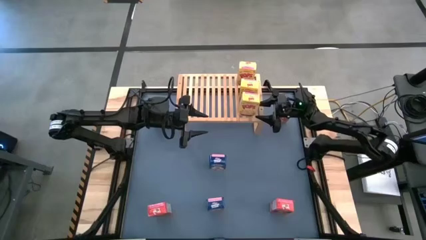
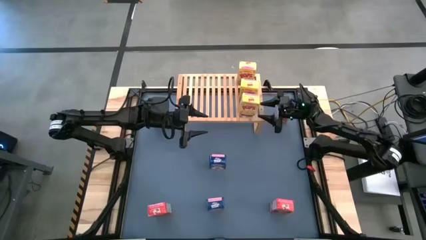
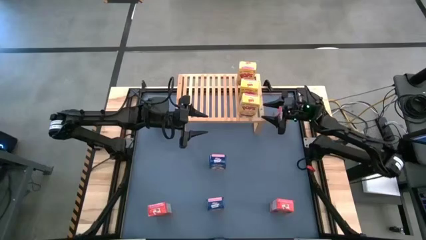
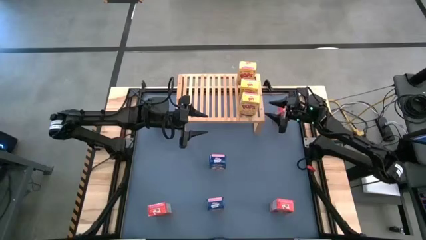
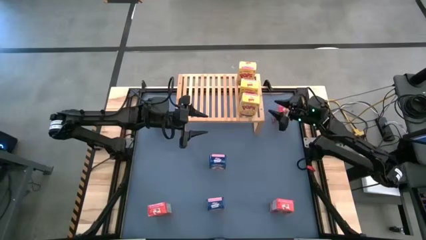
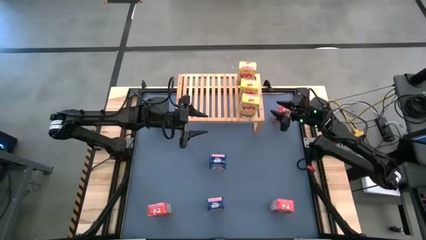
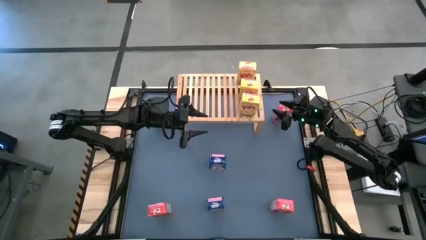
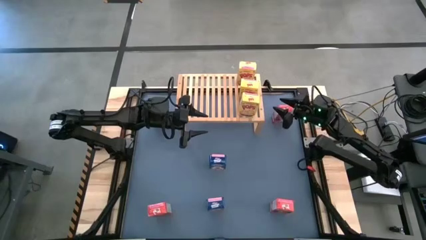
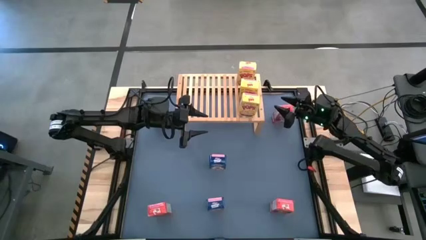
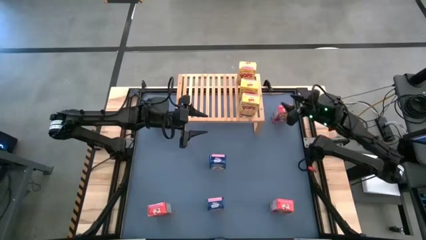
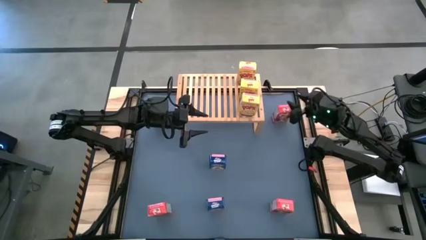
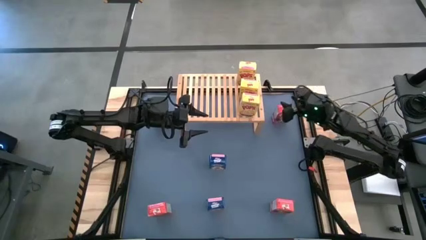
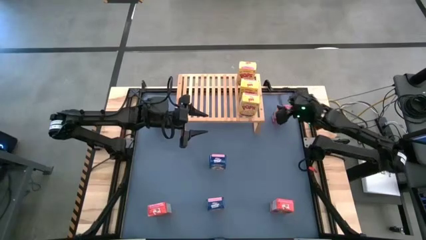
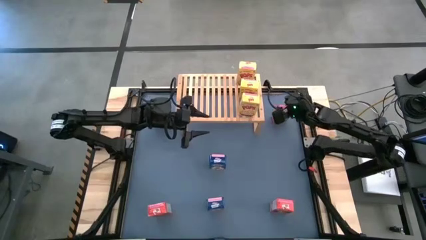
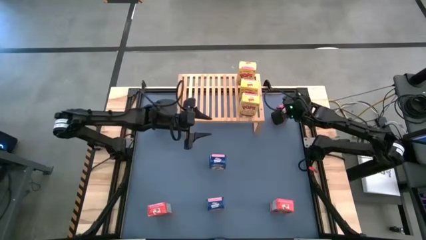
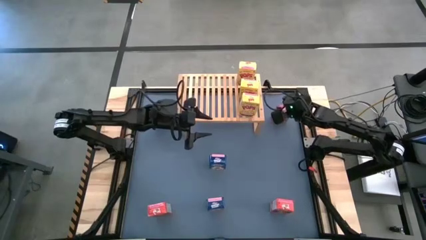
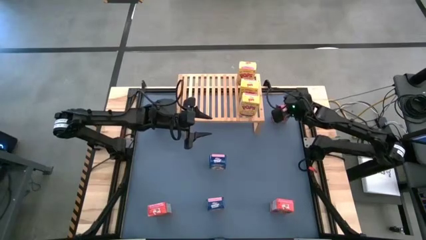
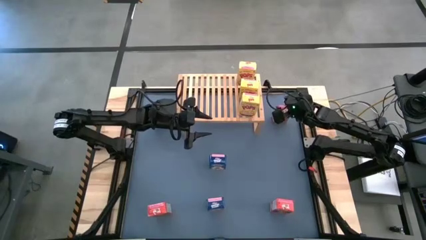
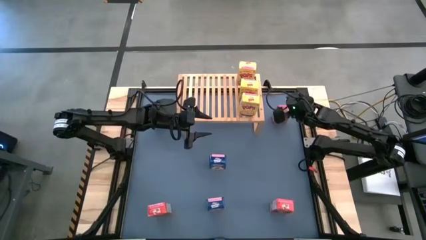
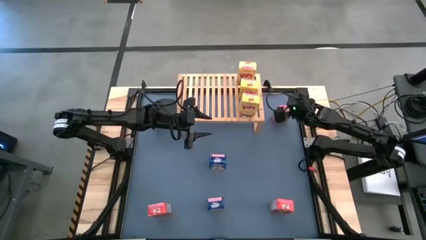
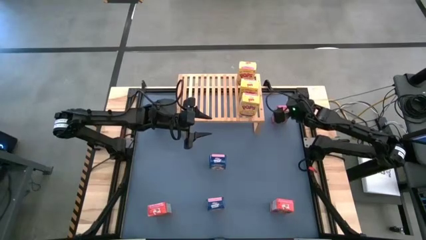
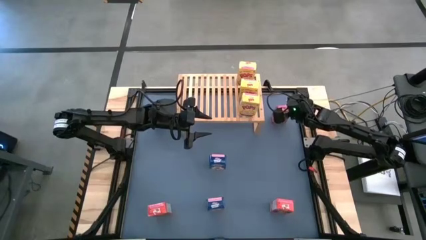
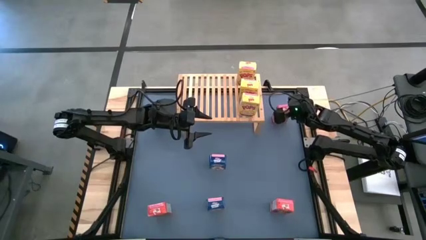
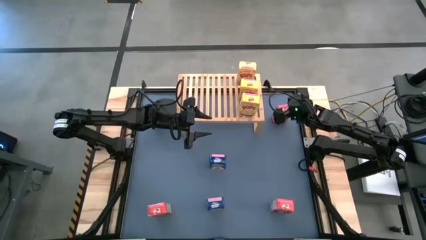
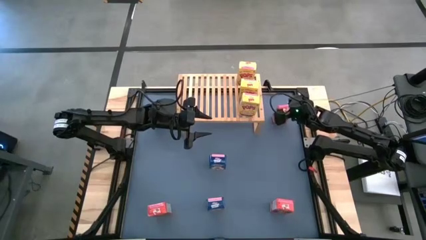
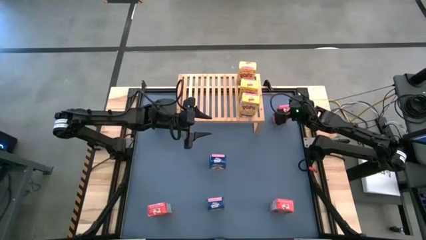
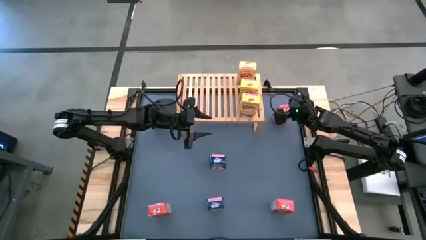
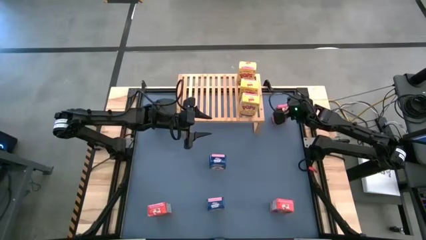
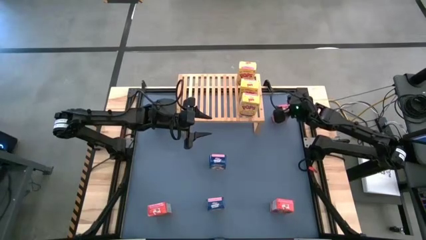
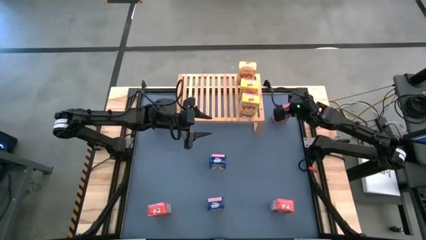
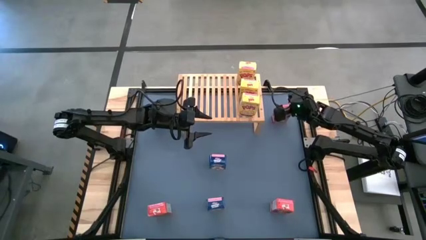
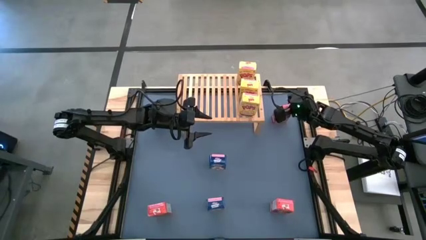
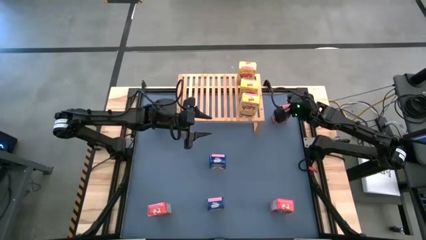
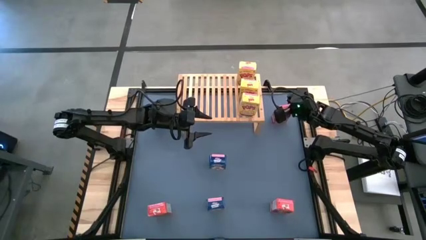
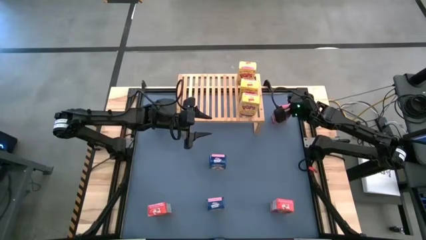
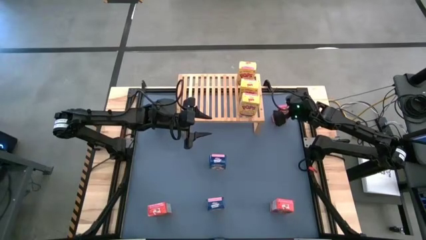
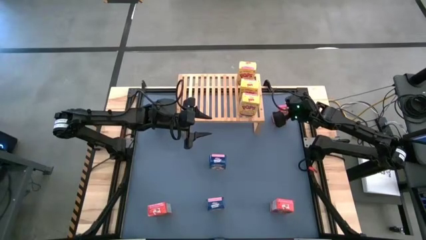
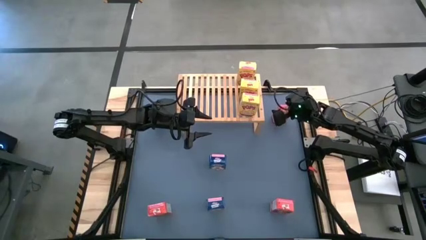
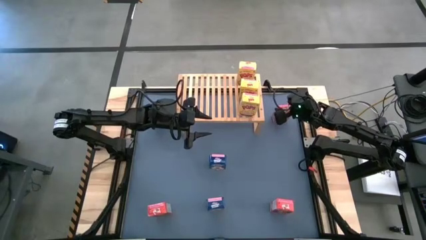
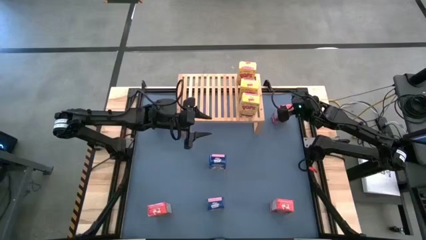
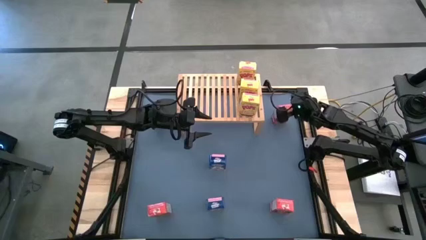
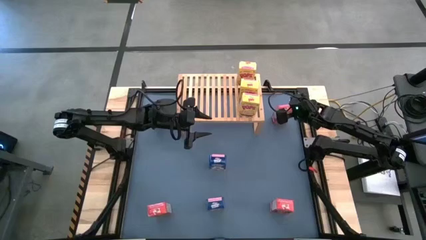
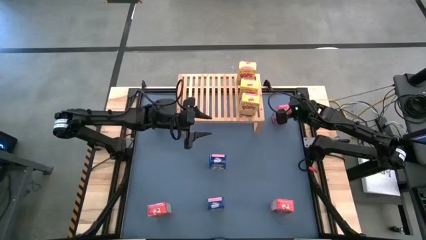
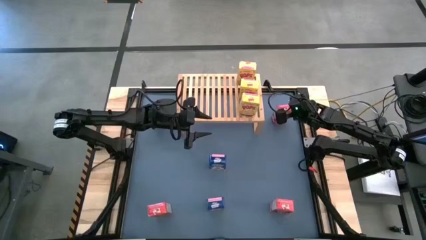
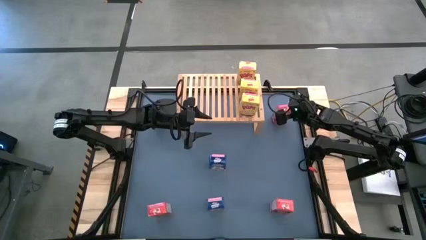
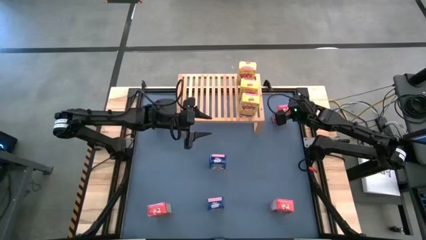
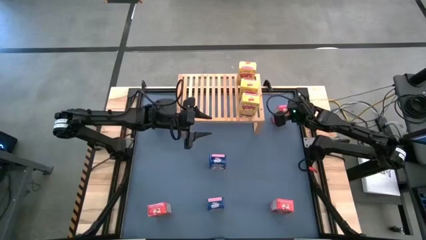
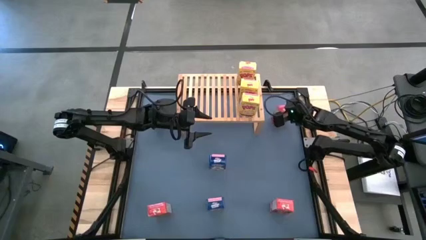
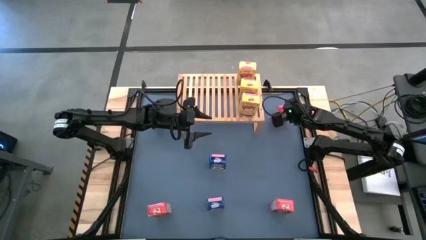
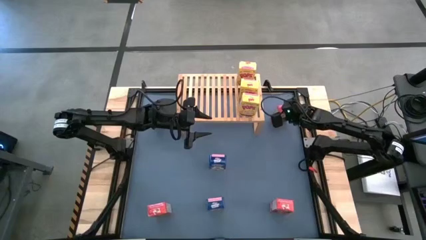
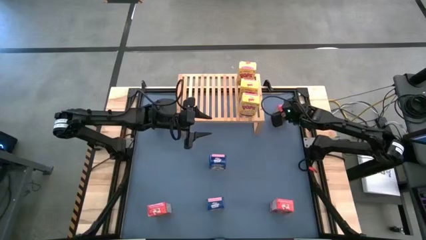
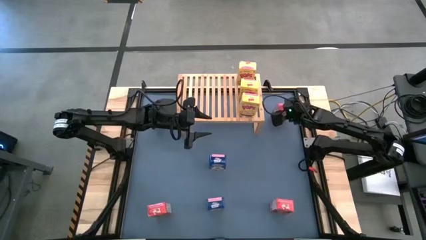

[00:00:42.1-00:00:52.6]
Task: Stack cereal on shelf
Put the top red cereal box on the shelf

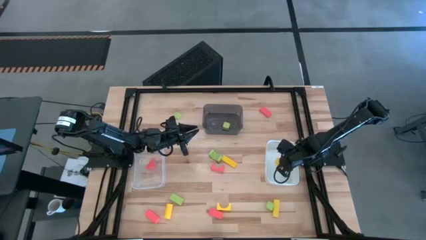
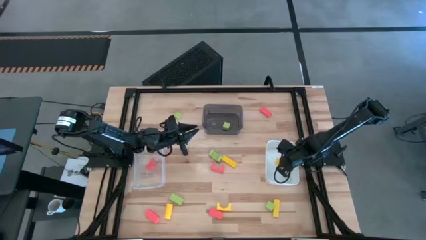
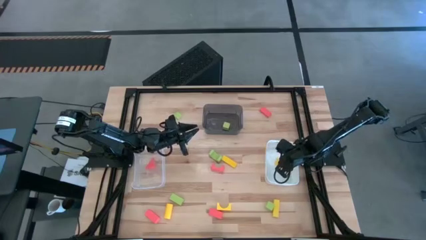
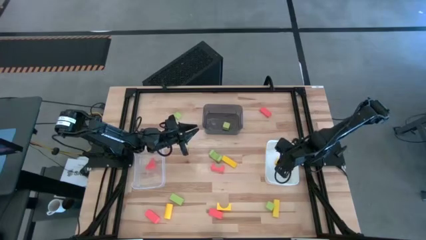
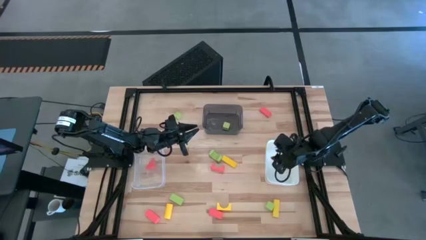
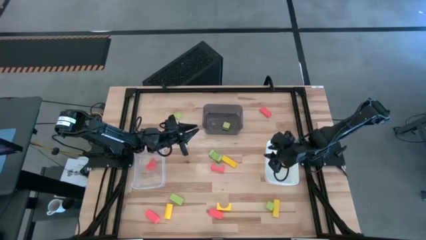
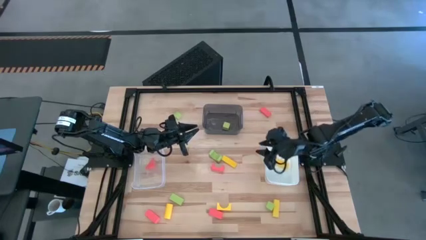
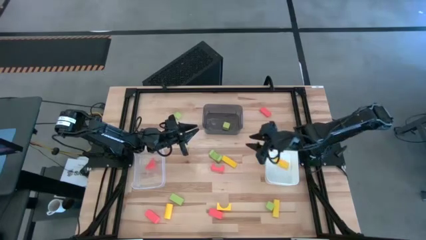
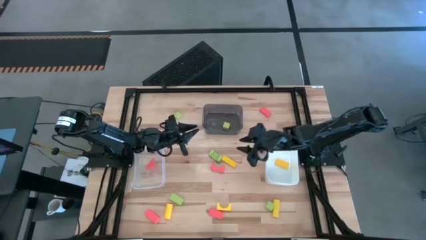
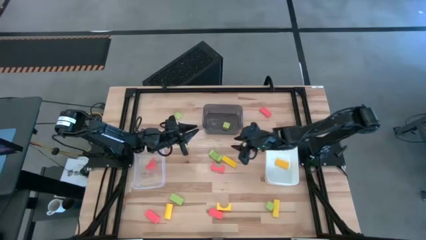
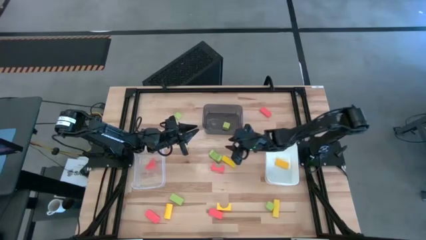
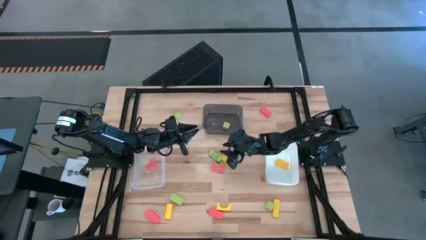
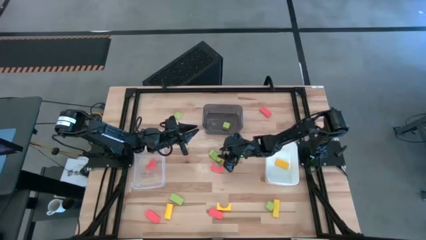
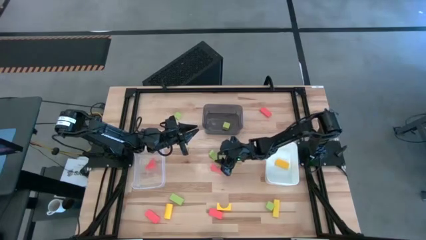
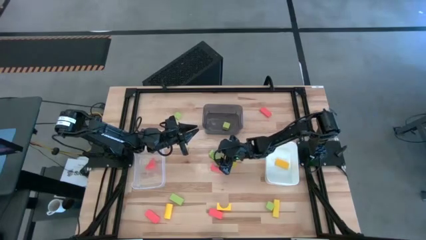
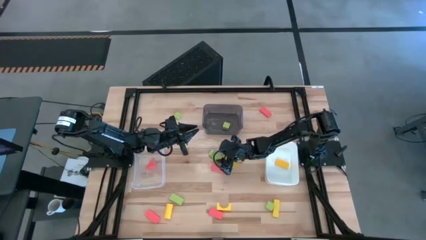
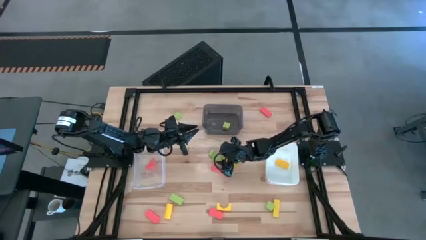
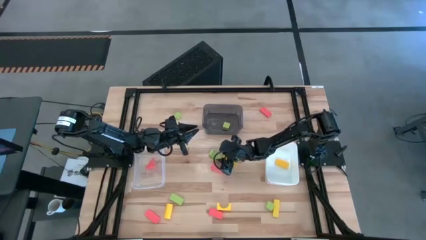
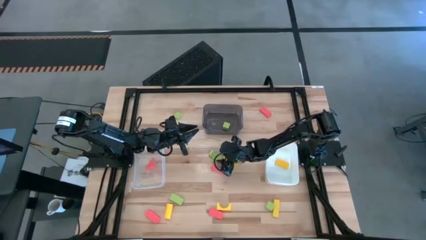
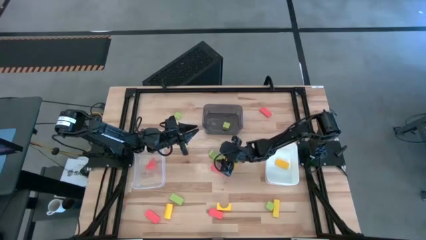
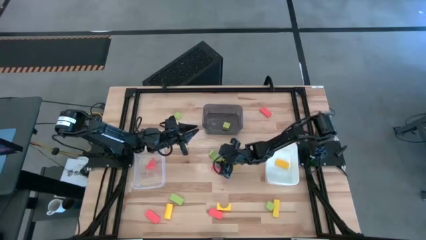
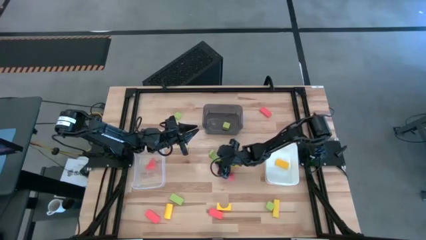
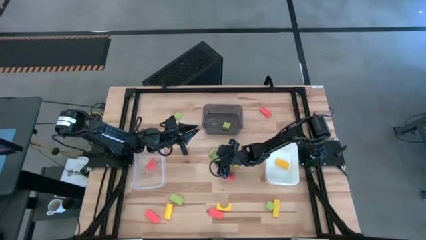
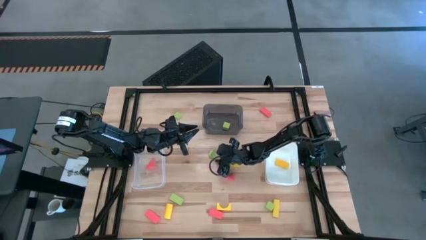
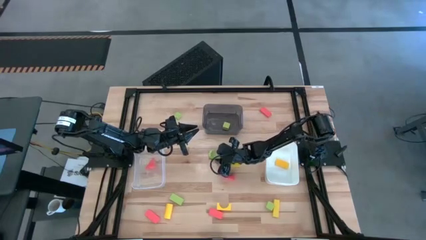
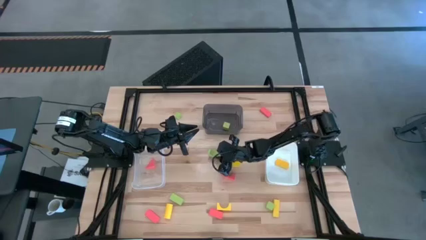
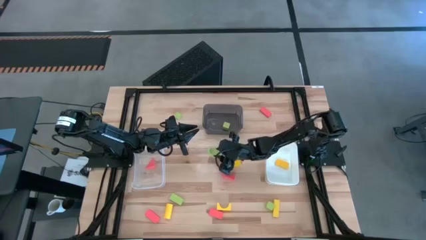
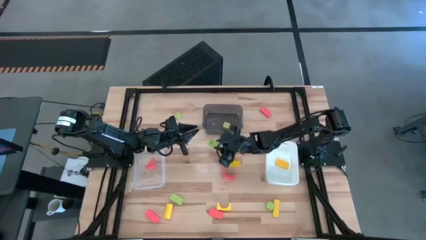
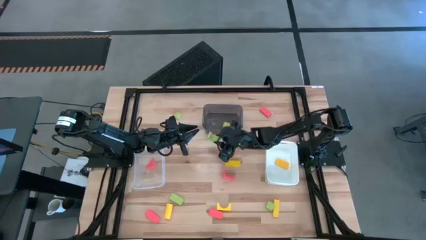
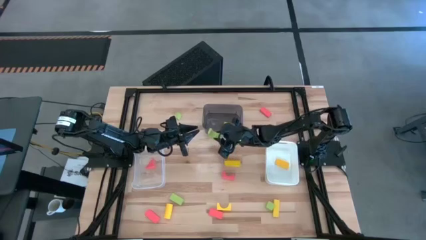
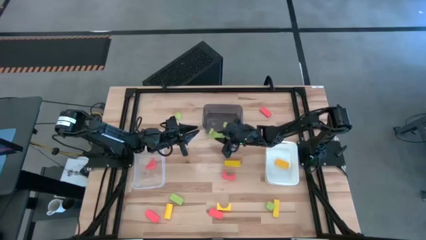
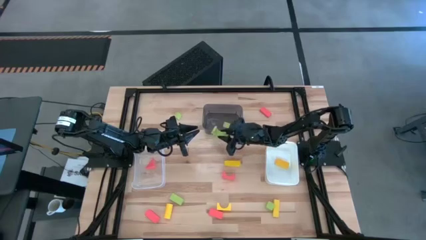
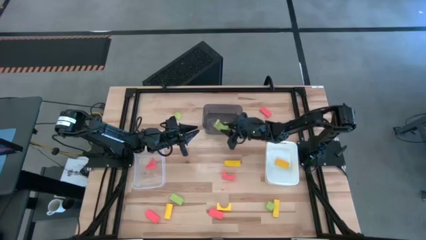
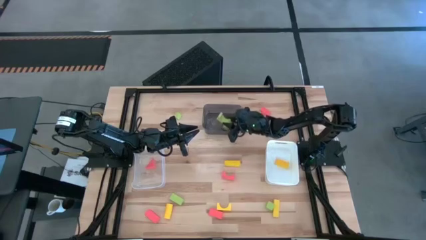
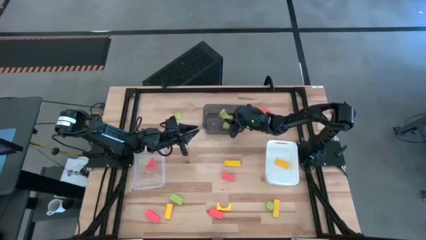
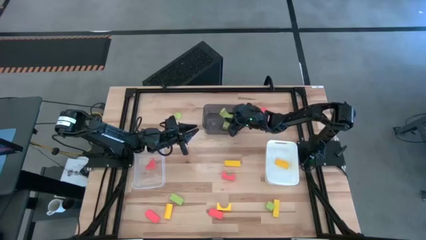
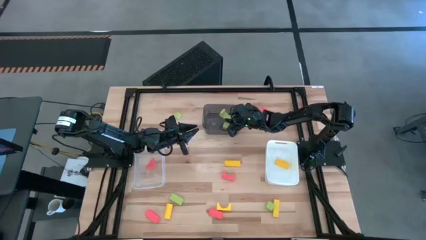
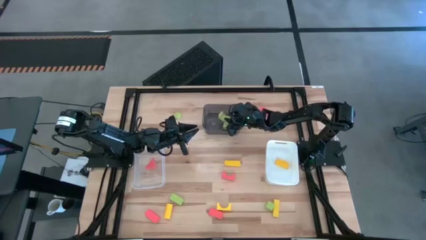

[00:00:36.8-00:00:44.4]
Task: Sort & place blocks by color
Put the green block into the black bin
